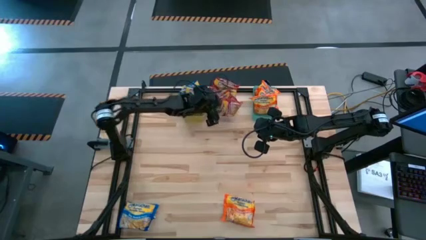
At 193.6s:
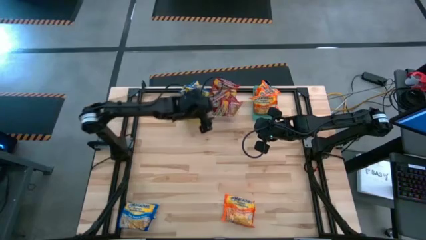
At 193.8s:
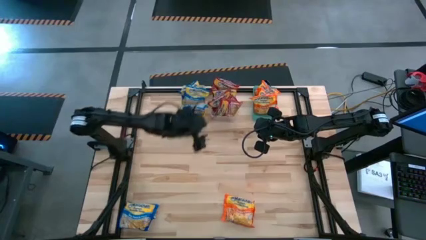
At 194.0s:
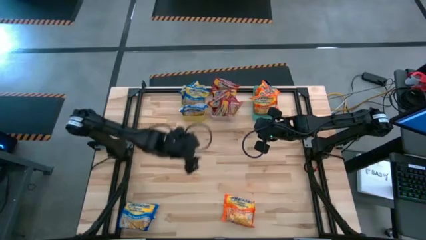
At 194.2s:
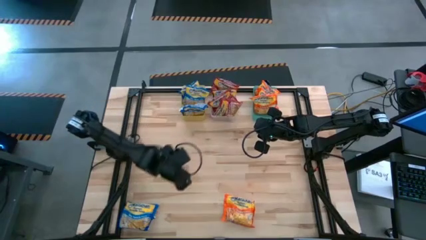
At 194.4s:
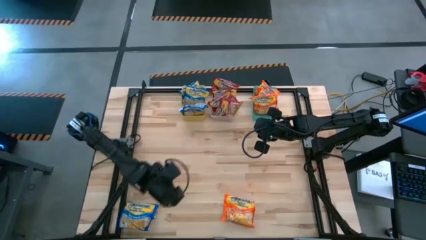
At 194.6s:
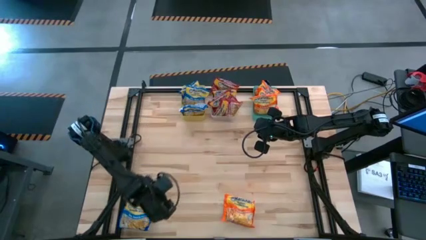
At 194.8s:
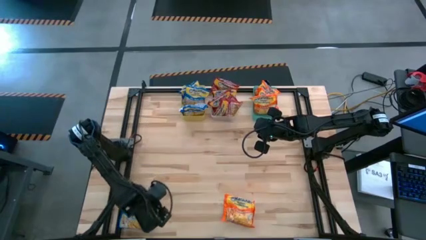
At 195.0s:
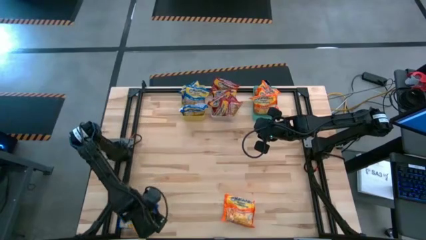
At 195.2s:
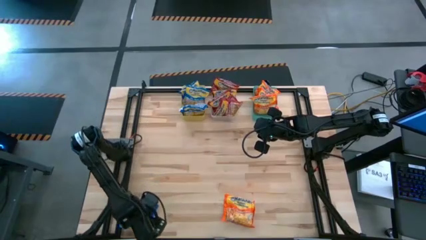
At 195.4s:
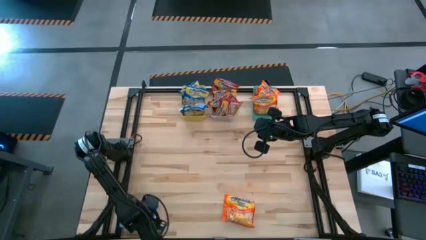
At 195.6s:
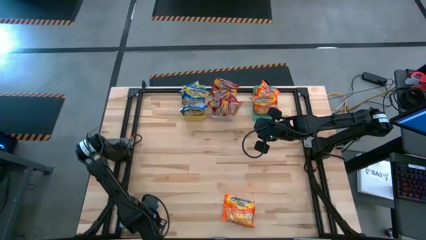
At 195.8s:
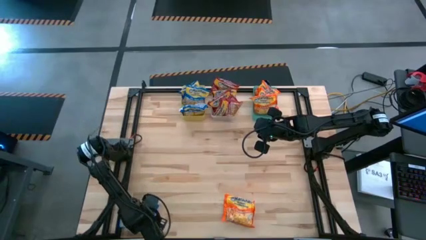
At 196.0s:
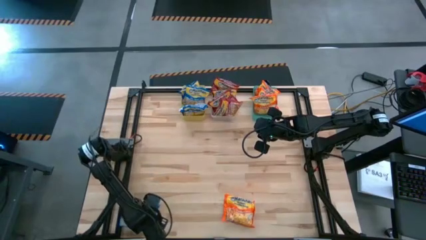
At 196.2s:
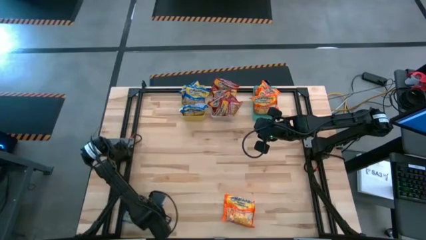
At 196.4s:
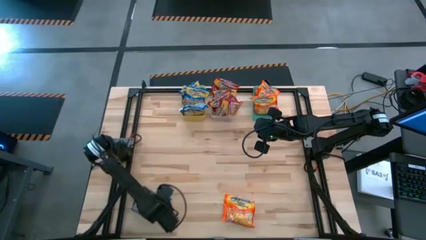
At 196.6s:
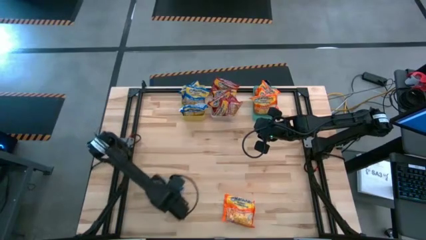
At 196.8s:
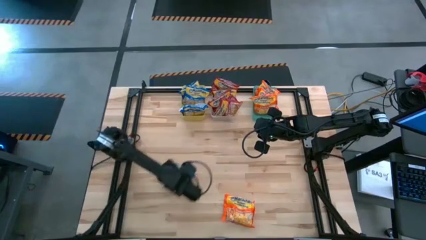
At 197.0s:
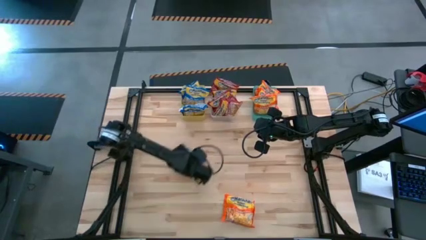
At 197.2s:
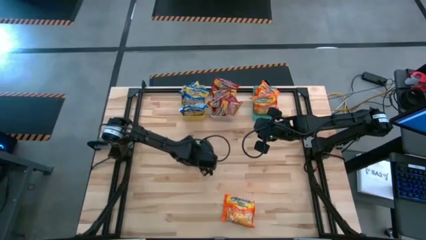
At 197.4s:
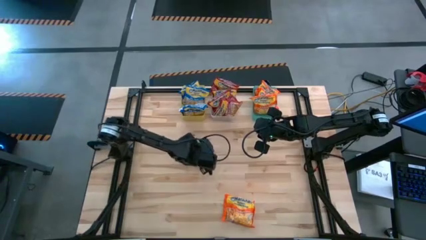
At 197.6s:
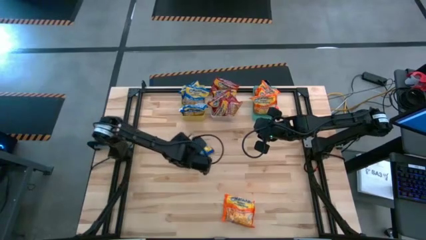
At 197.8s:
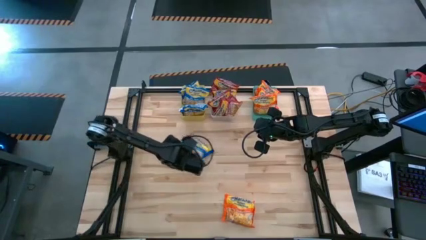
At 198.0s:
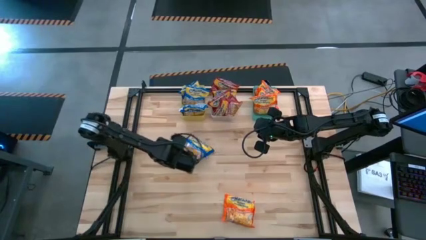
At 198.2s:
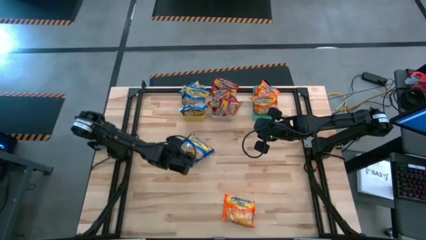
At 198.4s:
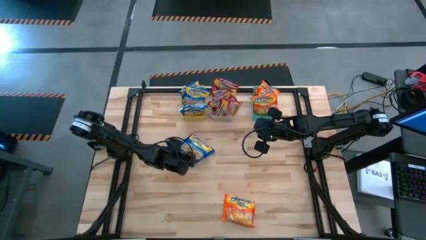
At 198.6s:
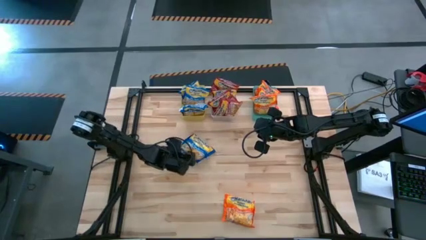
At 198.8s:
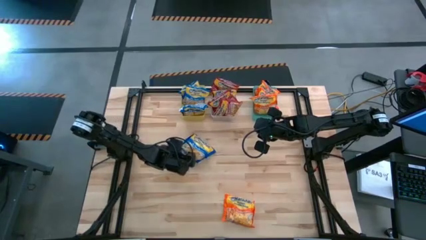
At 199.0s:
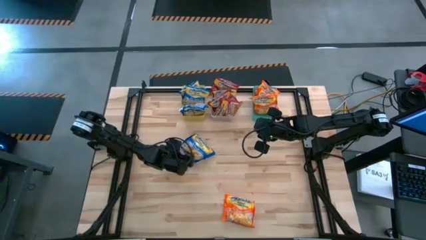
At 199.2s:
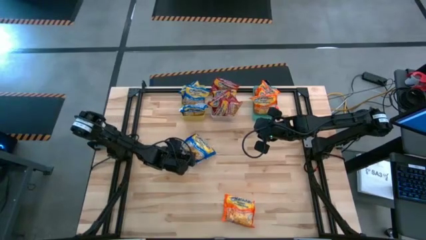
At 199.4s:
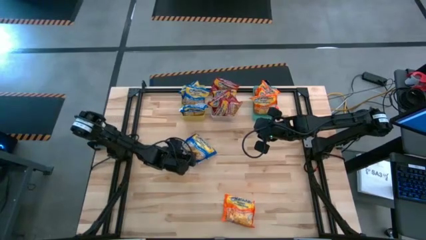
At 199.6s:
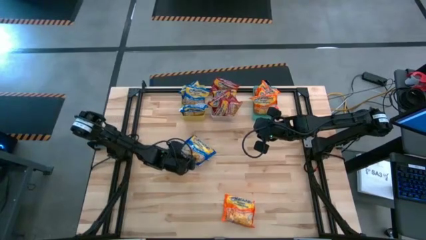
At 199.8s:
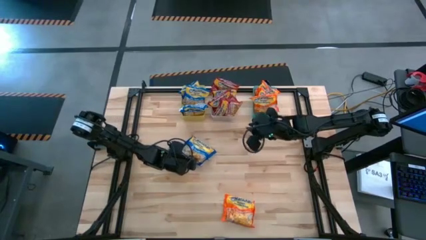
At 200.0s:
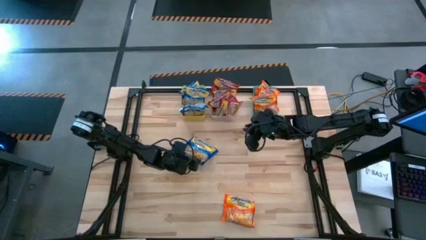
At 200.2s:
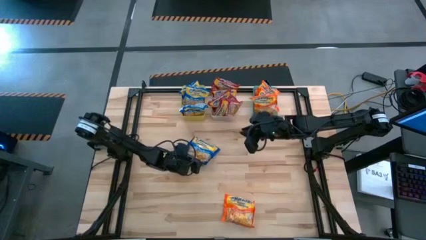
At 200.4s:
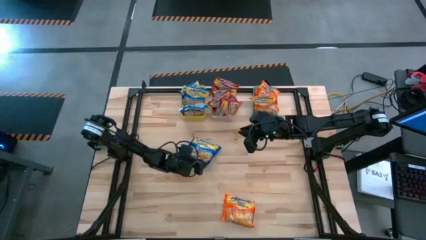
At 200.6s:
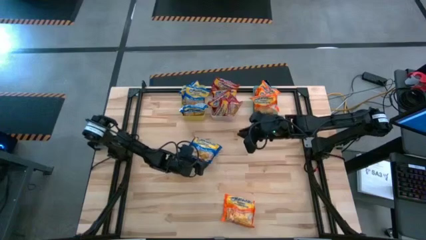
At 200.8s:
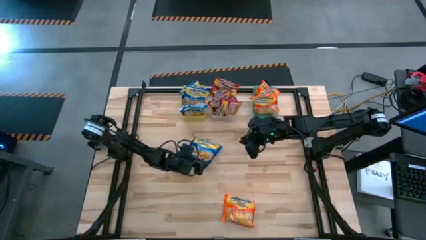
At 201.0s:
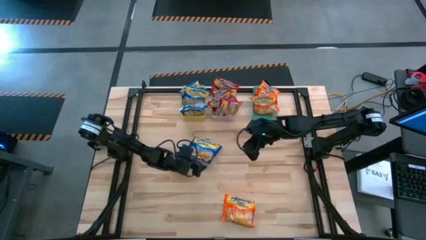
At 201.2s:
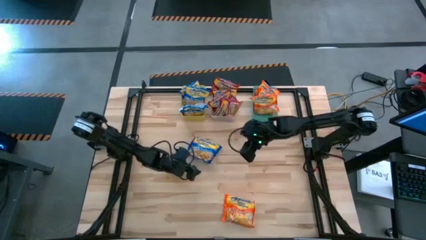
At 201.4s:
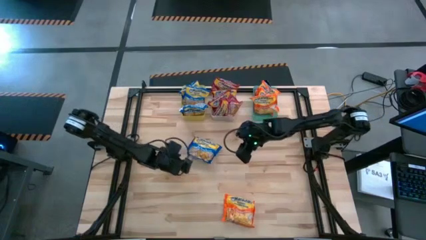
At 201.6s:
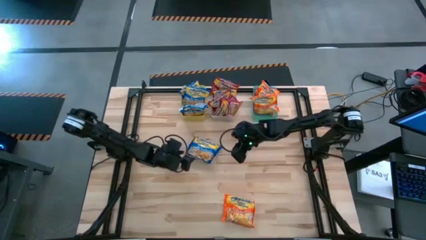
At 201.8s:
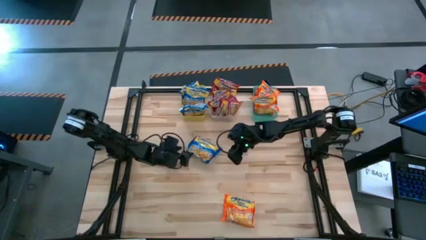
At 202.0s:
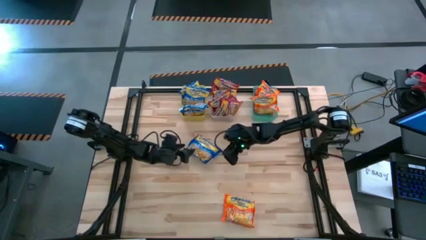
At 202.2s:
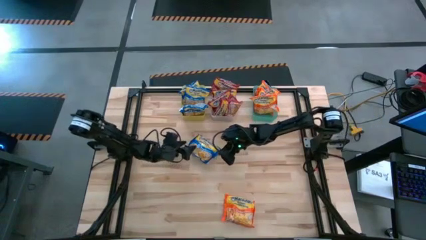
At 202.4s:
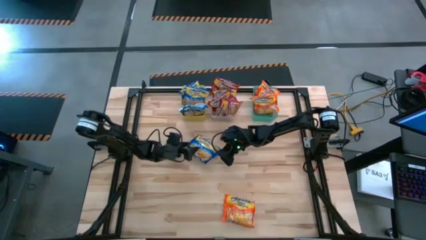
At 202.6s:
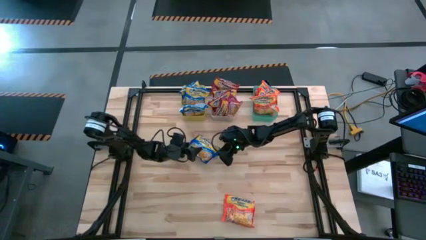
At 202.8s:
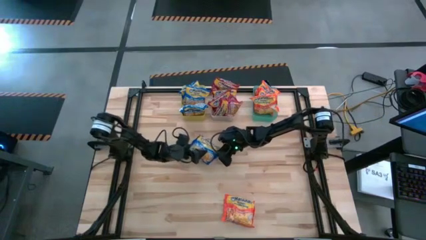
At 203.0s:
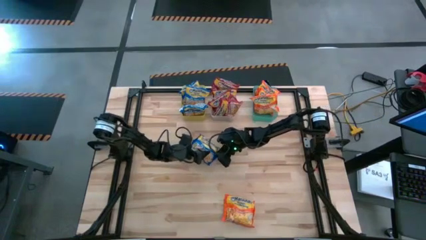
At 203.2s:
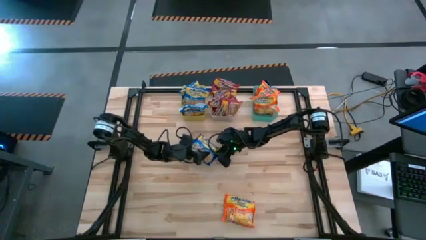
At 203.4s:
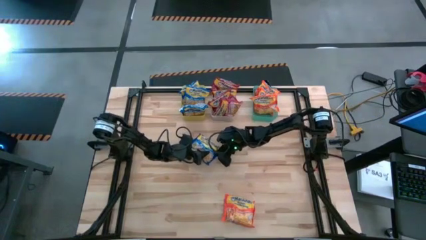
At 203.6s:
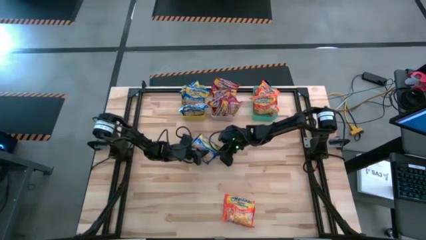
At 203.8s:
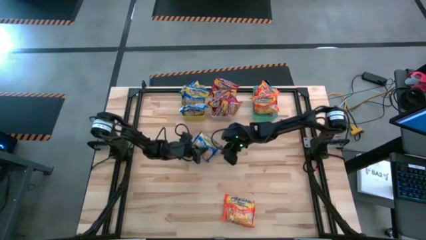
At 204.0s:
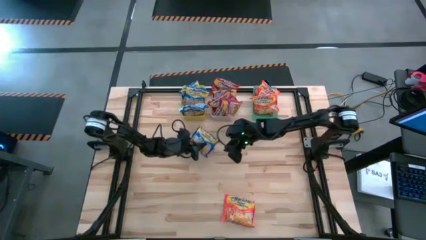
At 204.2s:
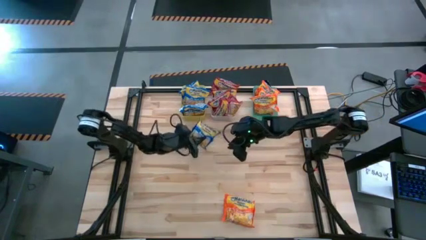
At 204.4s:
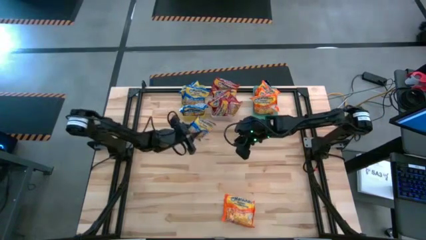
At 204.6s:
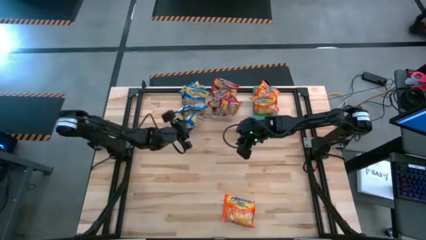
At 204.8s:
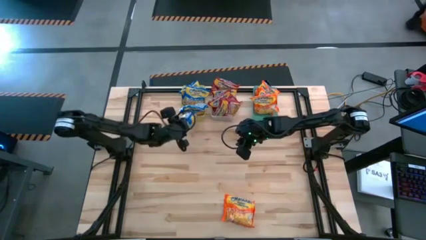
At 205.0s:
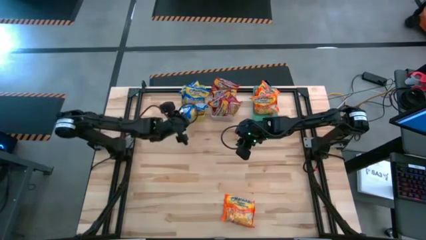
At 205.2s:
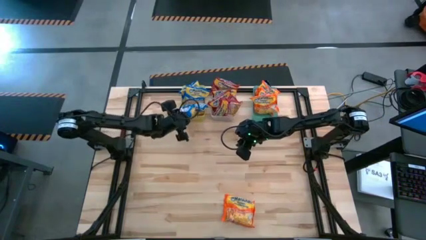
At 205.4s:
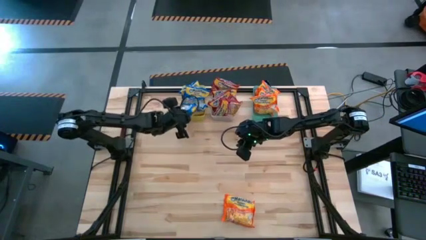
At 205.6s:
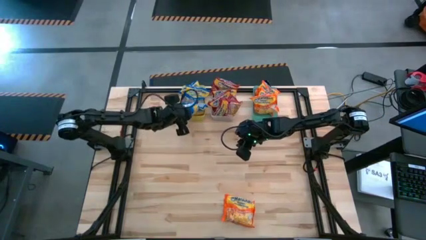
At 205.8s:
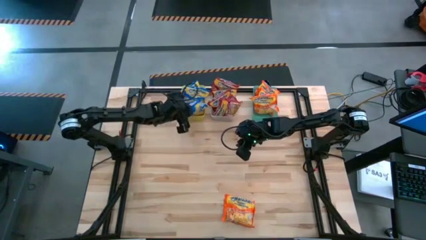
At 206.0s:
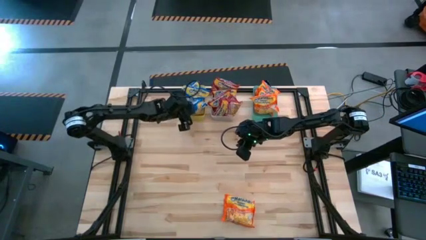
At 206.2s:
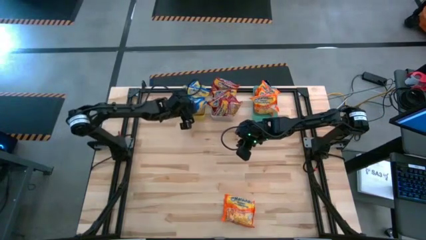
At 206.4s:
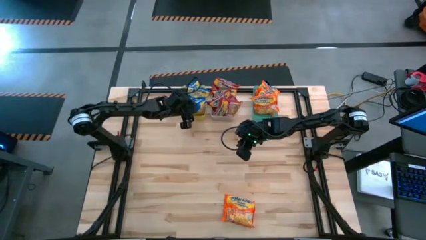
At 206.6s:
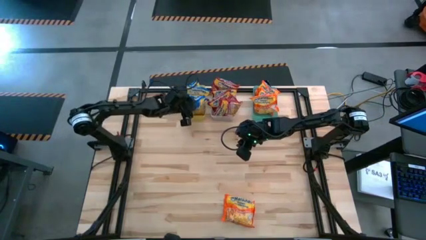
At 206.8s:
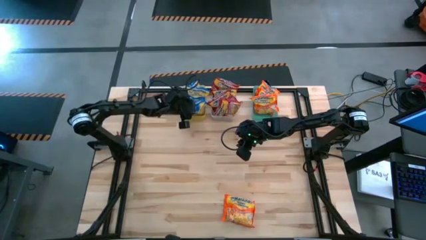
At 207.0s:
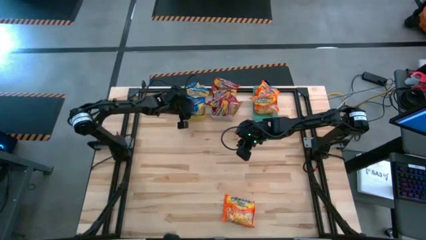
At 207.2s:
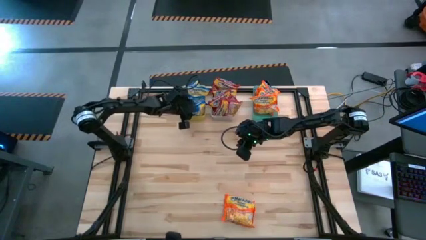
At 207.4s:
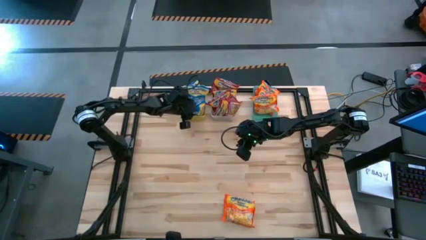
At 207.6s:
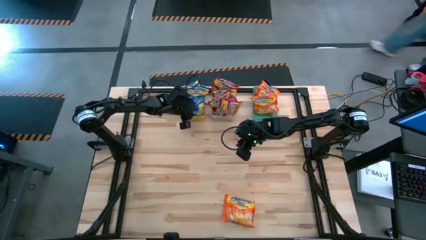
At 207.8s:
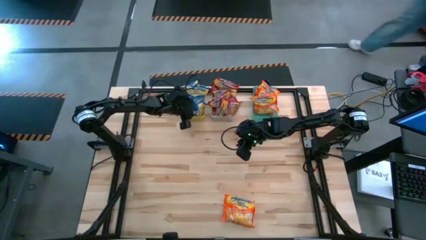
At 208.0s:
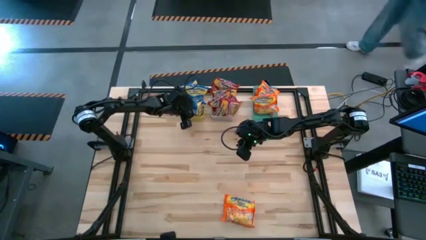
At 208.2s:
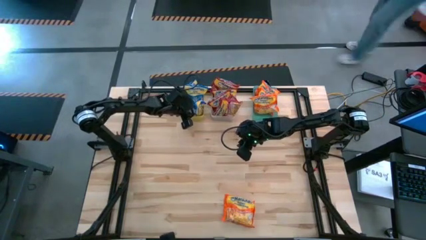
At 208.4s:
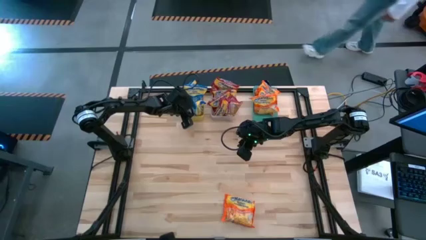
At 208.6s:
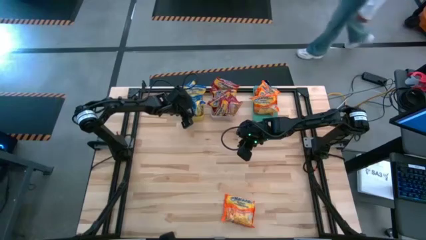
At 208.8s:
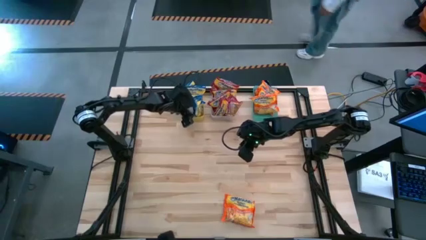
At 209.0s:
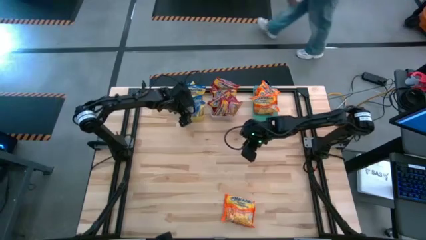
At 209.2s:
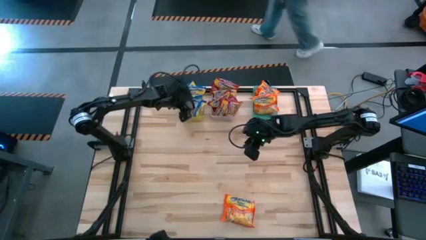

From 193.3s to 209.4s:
Task: Sort Maruchan noodles
Put the blue pack into the yellow bin

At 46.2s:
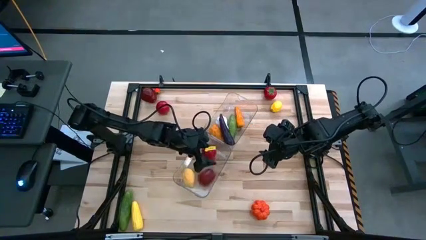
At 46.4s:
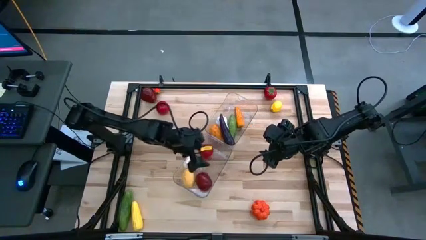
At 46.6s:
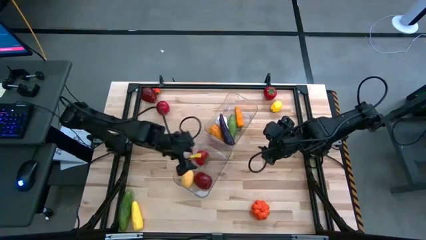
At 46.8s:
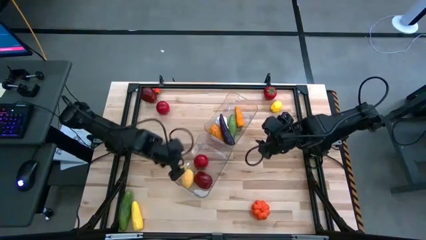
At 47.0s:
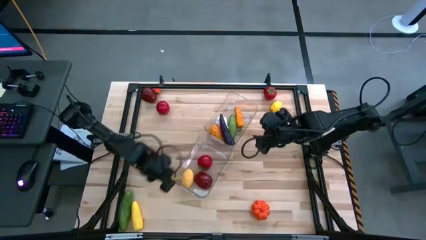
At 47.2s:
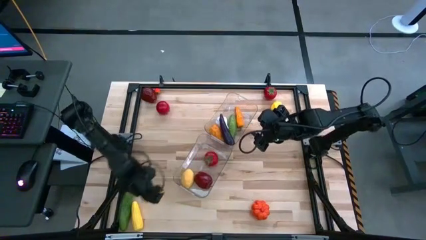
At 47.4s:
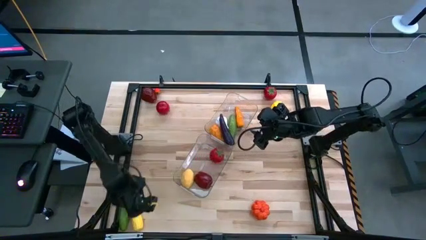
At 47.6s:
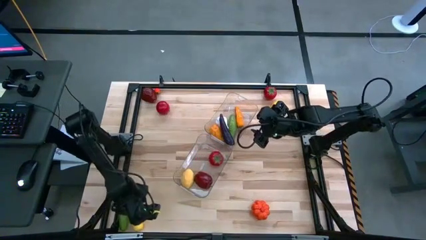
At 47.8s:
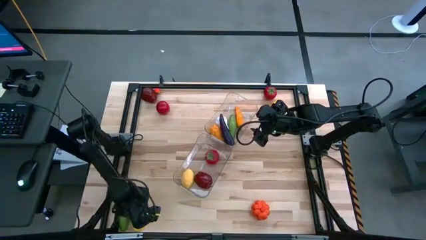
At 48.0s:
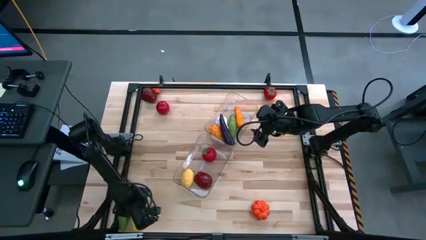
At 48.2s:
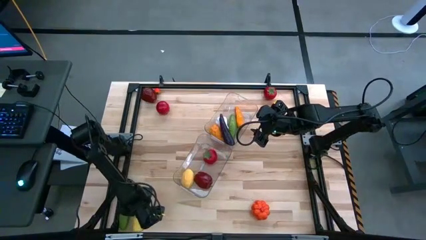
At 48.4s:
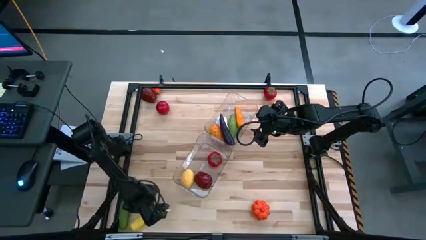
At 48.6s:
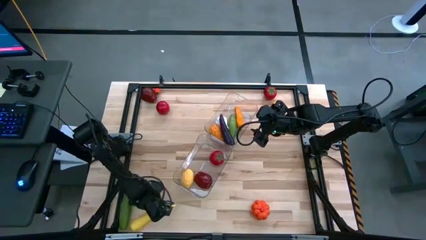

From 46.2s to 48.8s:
Task: Sort produce into baskets
Put the yellow corn into the top transparent bin
